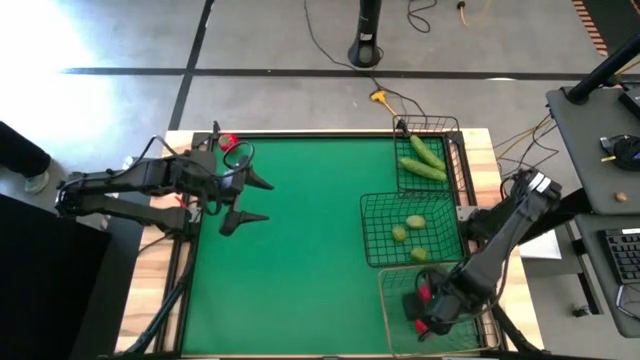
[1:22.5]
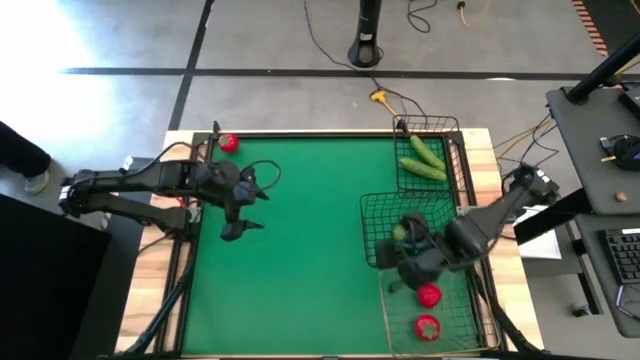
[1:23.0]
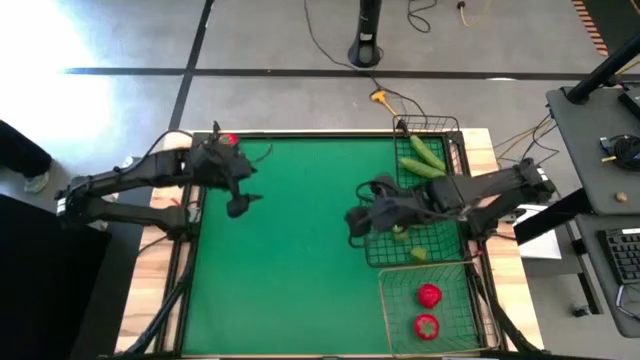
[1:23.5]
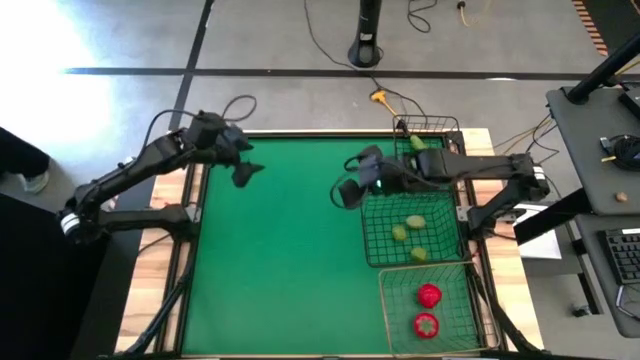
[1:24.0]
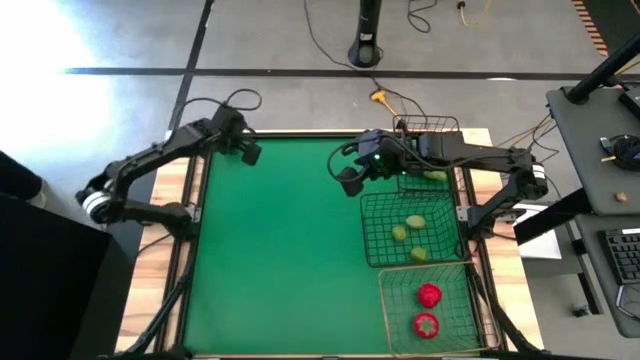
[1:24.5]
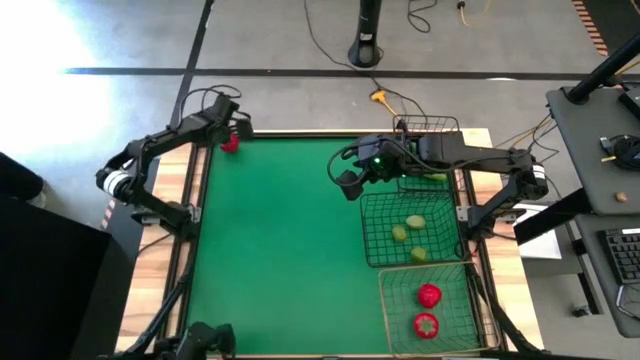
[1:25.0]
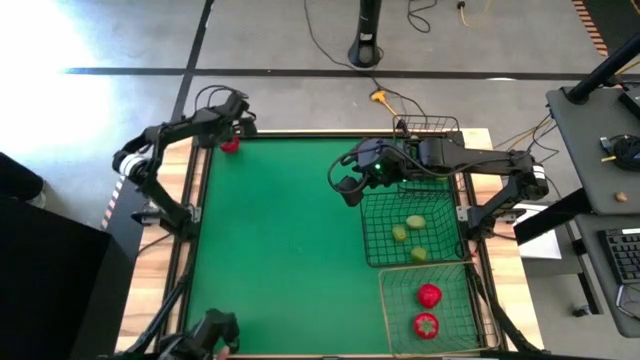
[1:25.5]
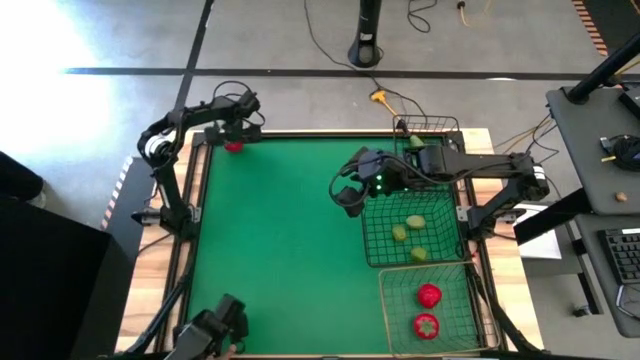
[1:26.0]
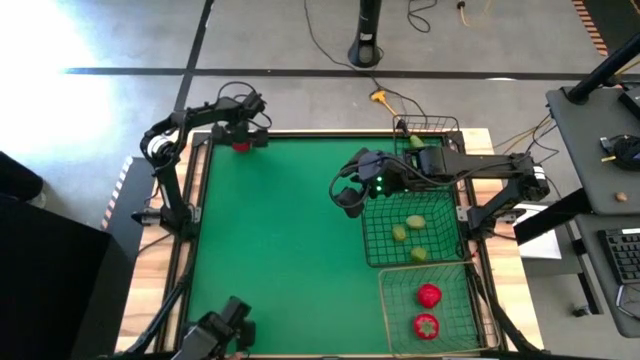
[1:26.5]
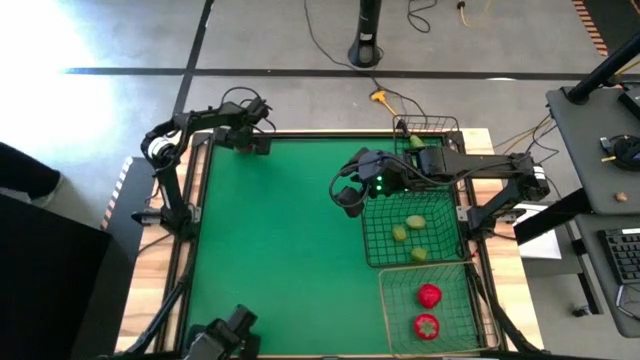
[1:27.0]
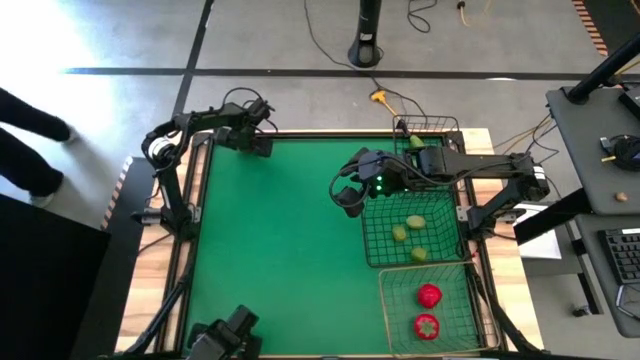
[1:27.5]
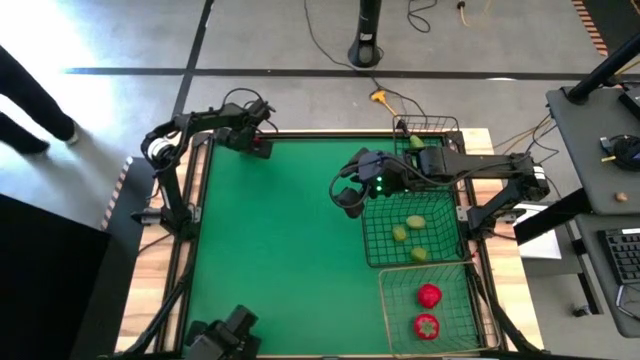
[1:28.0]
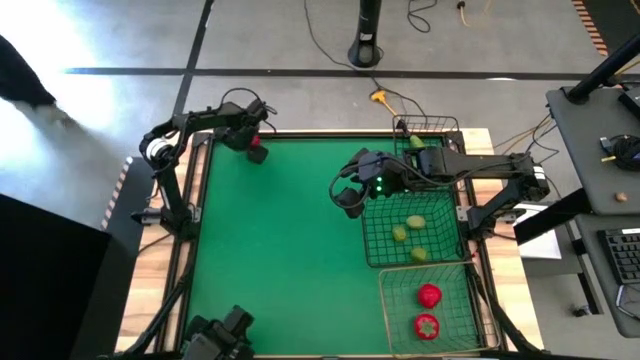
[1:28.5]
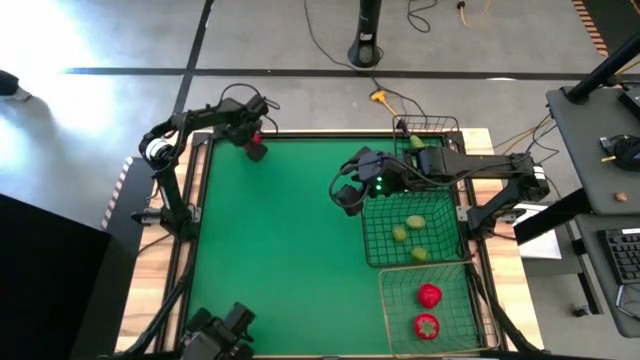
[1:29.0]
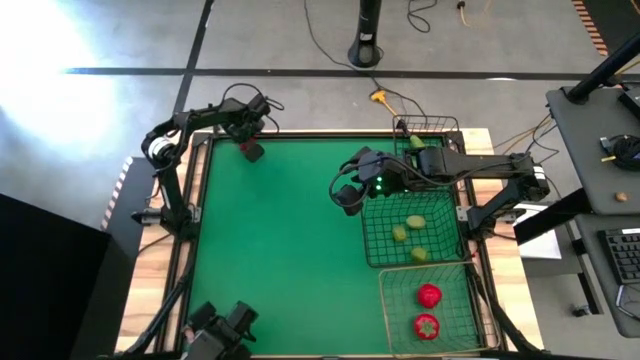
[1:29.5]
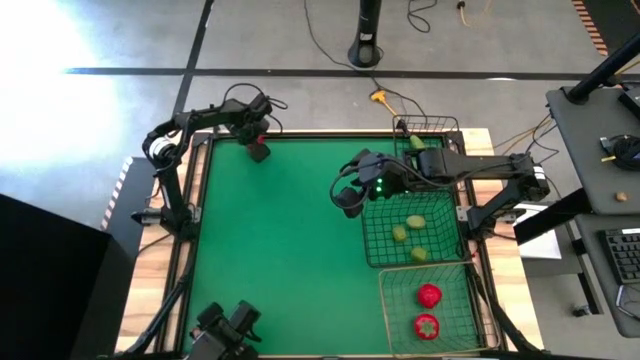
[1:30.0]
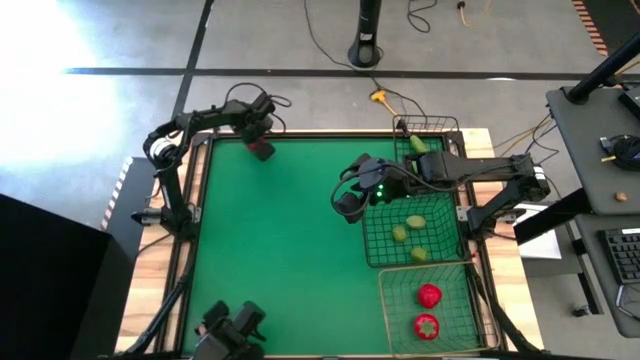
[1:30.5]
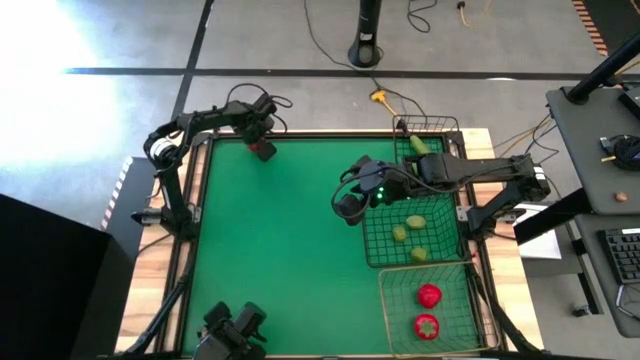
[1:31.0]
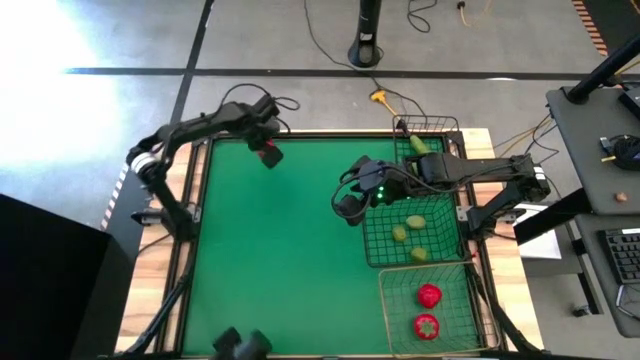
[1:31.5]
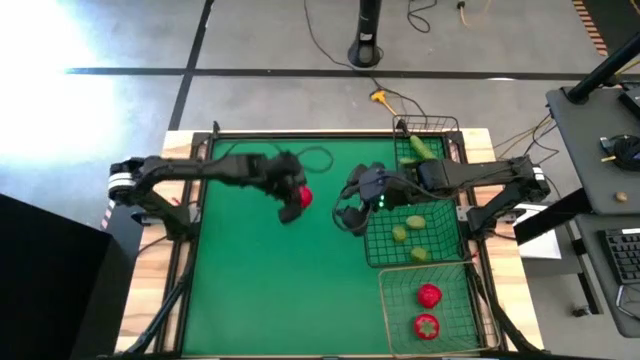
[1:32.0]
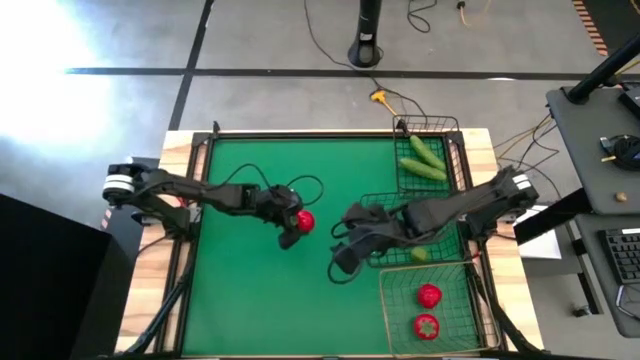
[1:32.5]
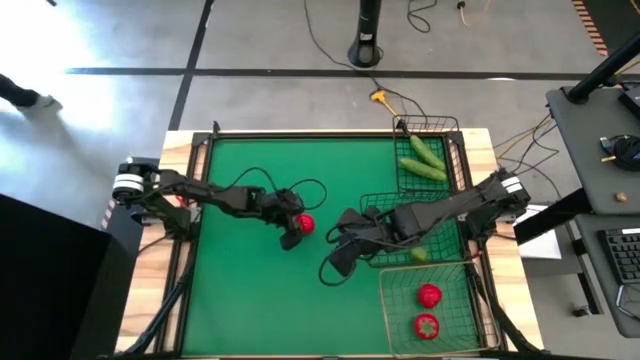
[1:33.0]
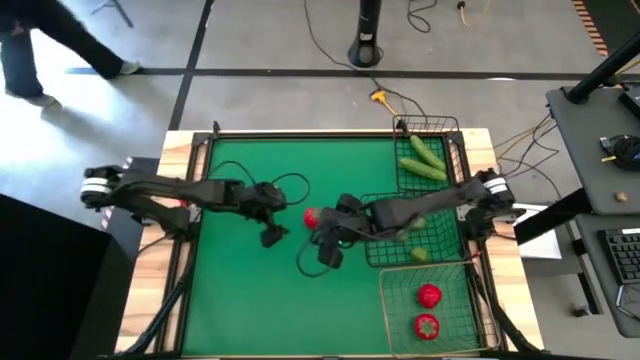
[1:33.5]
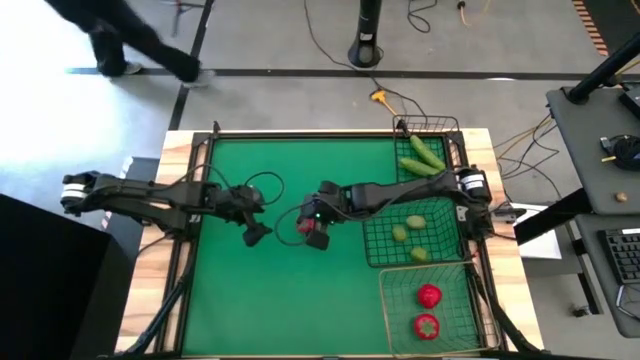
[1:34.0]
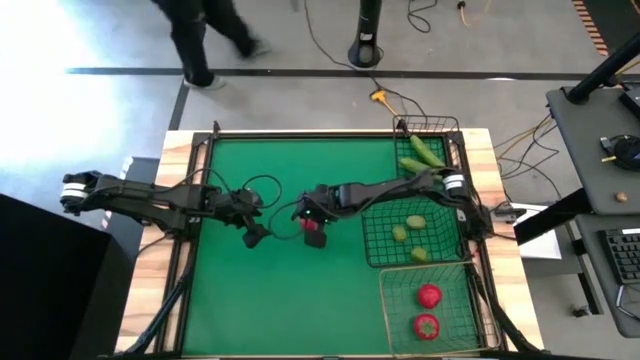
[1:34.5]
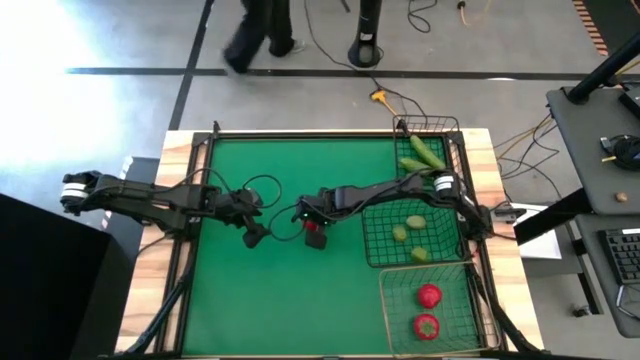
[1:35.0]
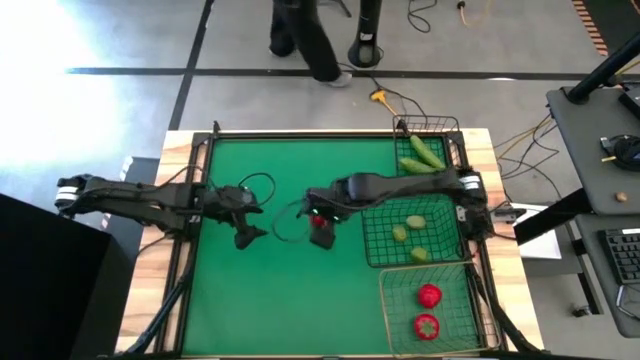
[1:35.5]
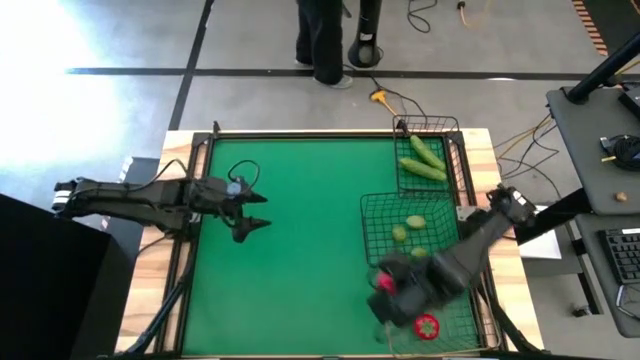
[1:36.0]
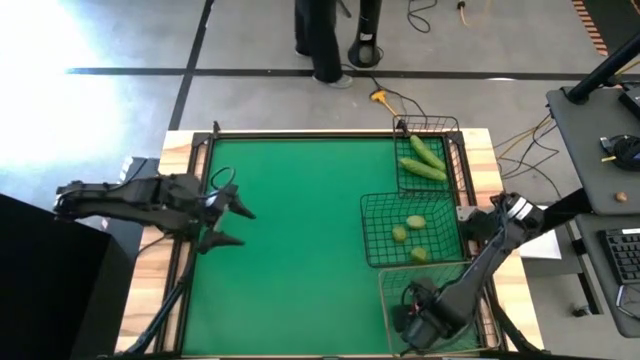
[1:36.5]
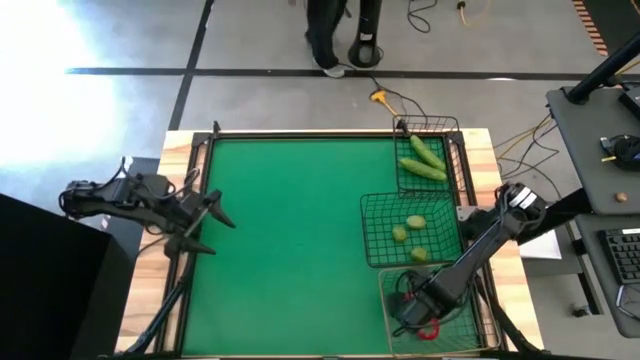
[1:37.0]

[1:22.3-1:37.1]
Task: Sort produce into baskets
Put the tomato into the gold wire basket

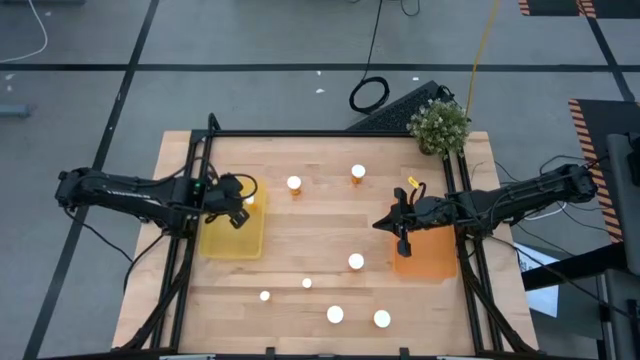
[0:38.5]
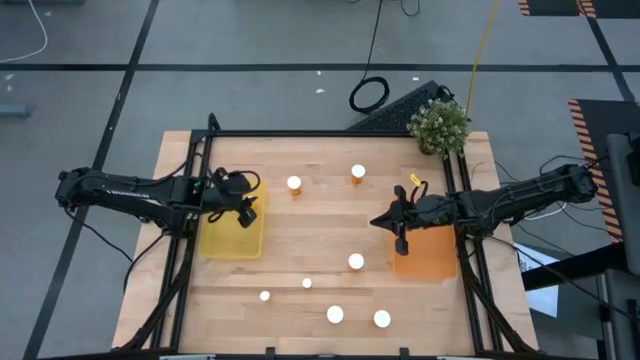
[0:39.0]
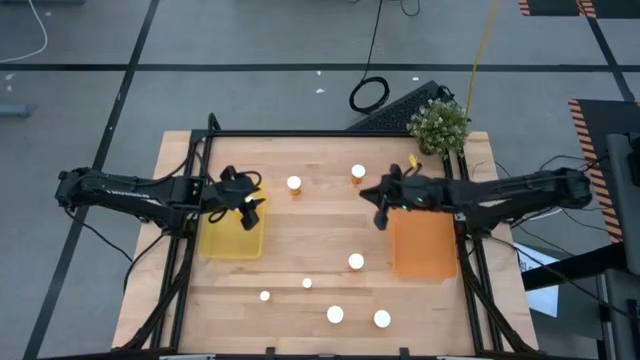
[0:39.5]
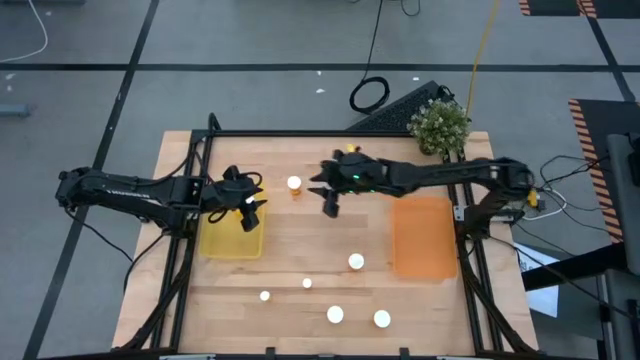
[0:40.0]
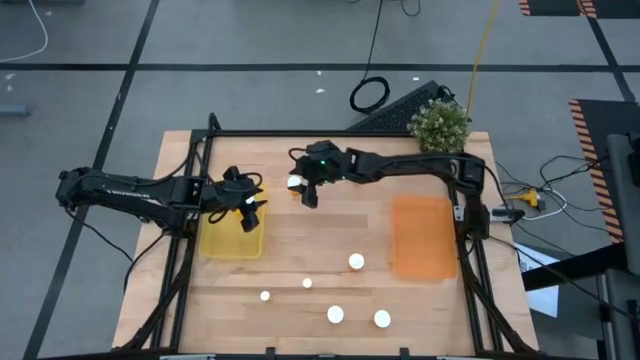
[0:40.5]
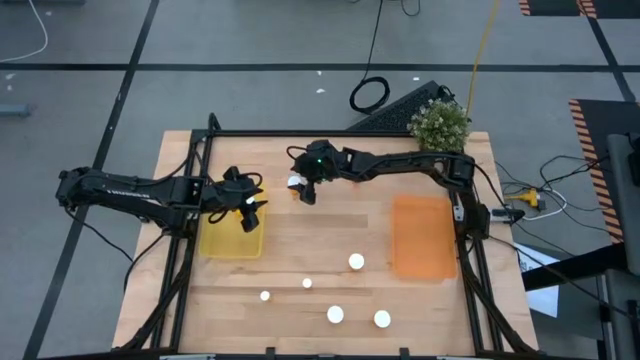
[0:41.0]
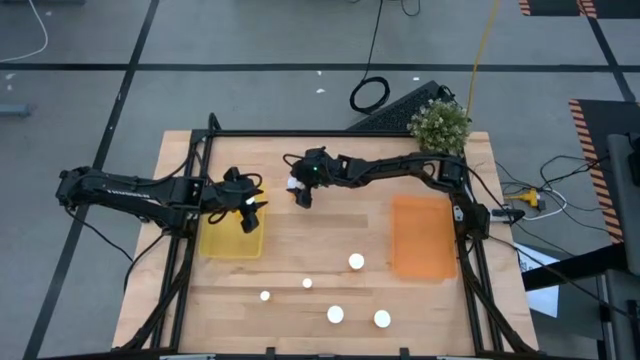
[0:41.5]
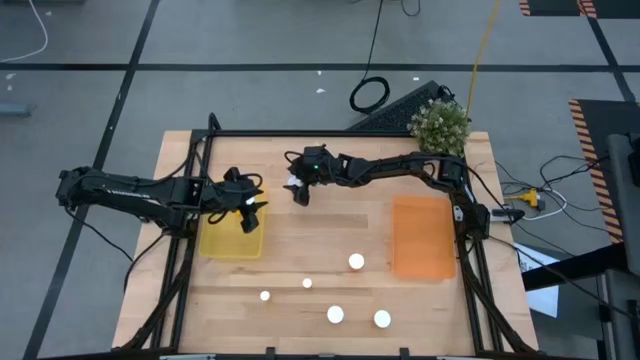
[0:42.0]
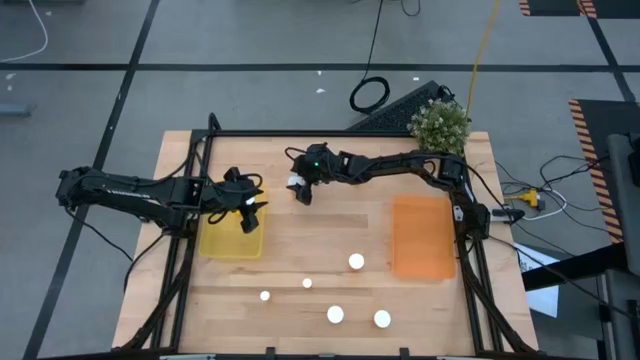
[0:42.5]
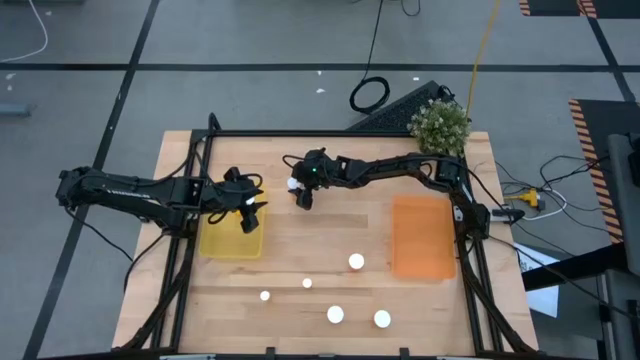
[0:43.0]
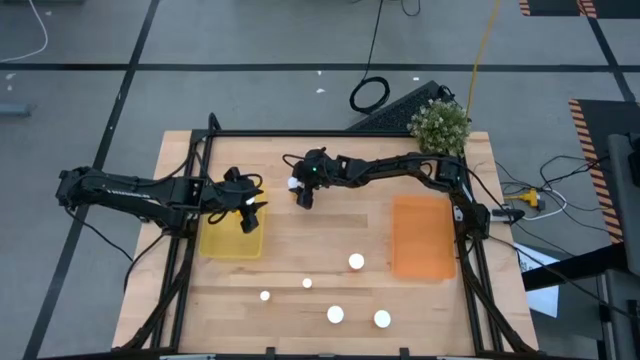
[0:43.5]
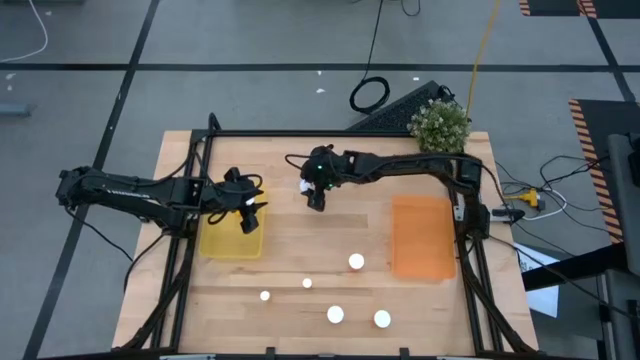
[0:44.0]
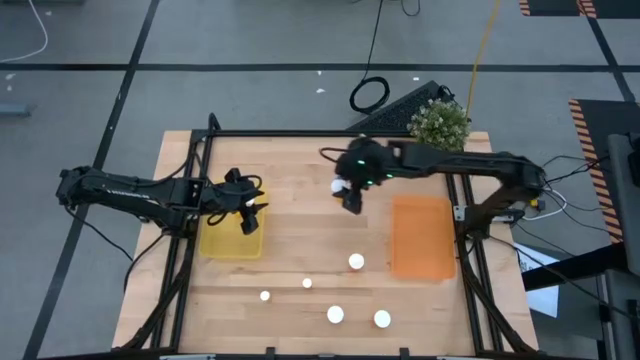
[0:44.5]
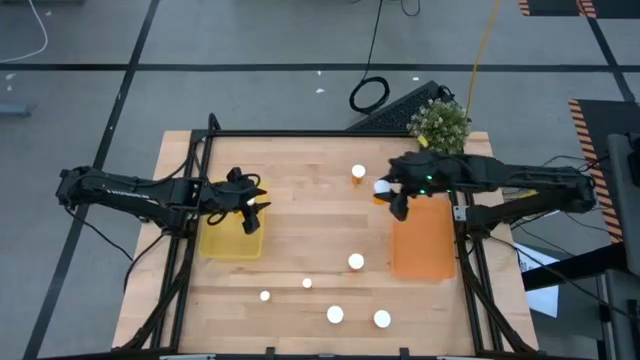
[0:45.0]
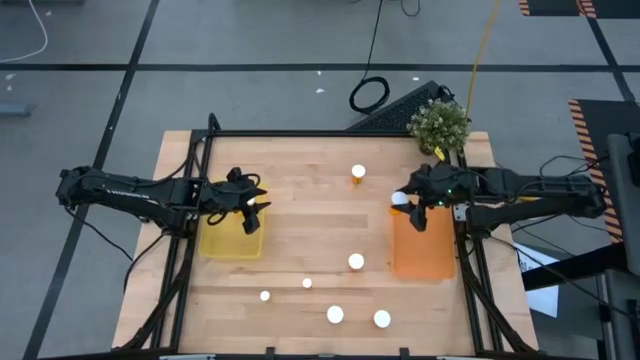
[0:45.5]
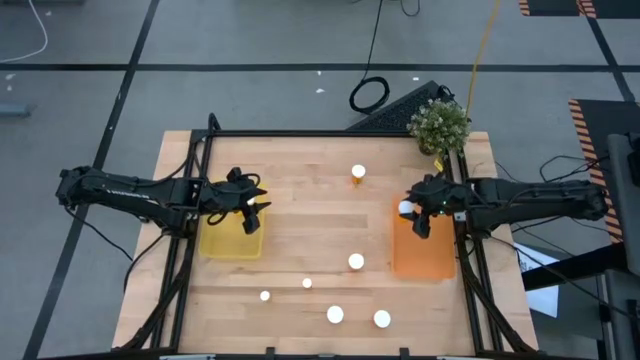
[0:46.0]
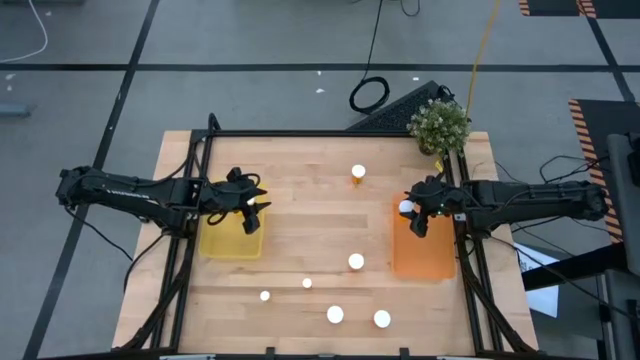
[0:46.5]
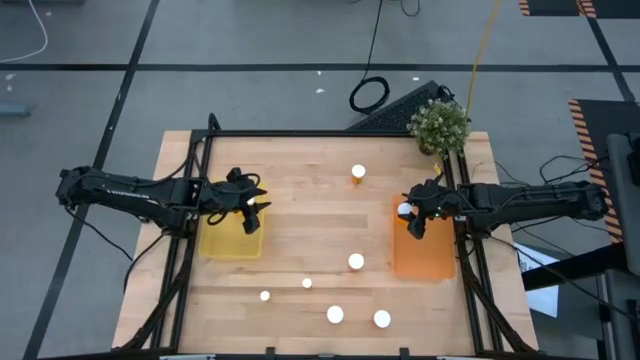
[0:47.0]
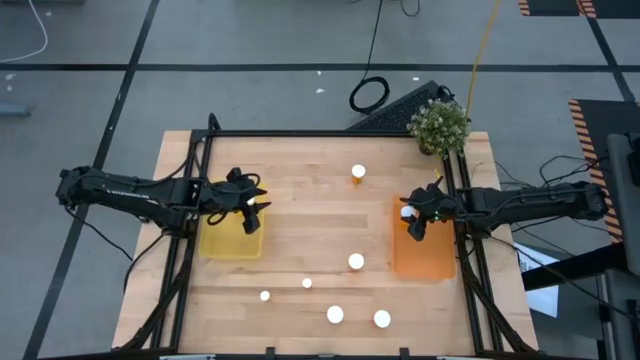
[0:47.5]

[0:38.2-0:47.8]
Task: Pick and place medicine bottles into bin by pill shape (circle, oval)
Put the large orange pill bottle into the orange bin
